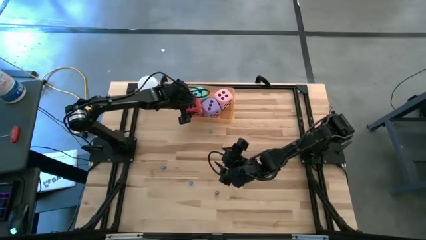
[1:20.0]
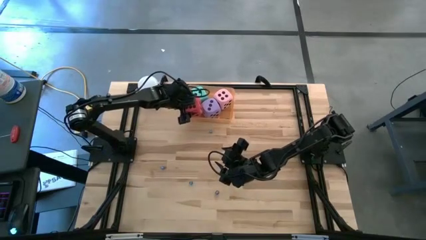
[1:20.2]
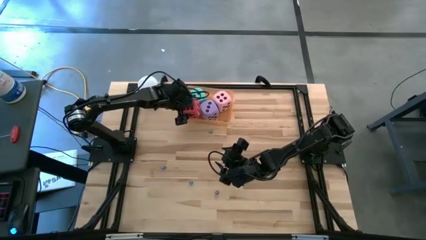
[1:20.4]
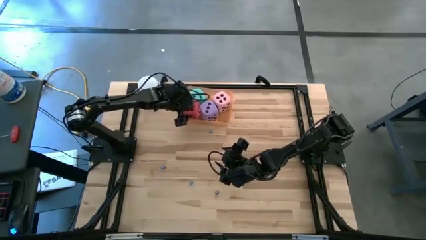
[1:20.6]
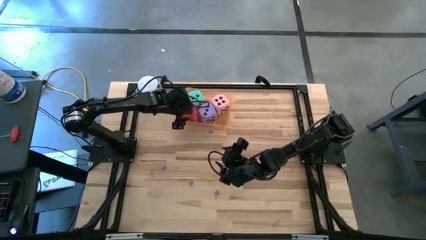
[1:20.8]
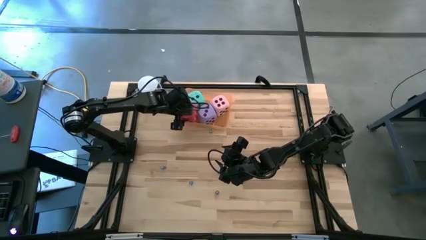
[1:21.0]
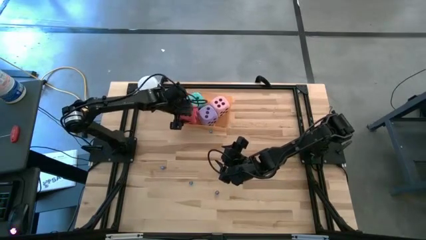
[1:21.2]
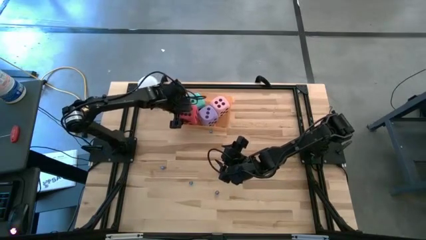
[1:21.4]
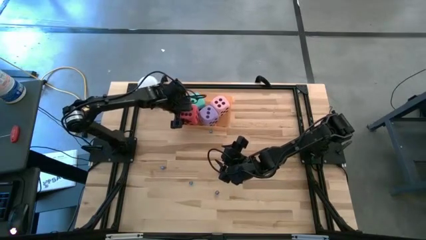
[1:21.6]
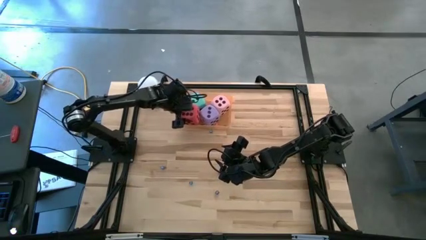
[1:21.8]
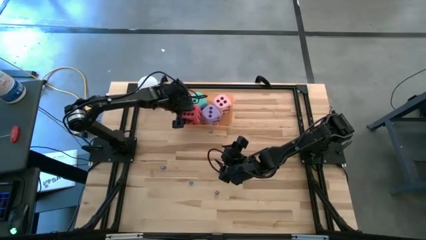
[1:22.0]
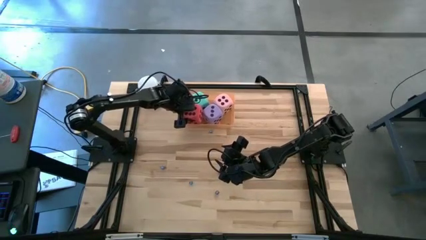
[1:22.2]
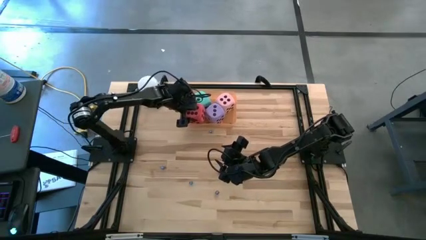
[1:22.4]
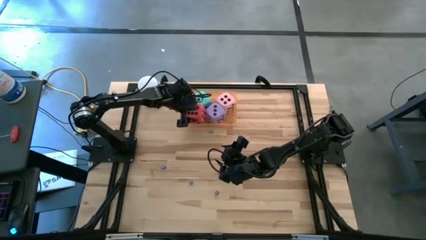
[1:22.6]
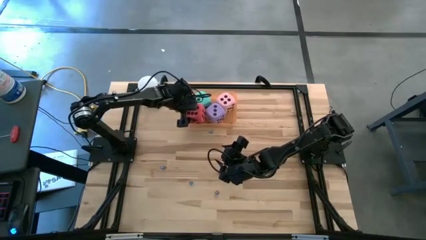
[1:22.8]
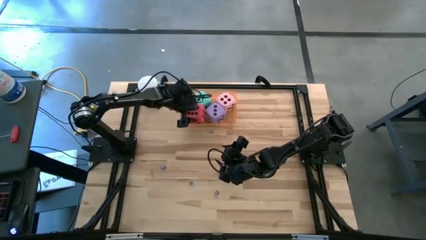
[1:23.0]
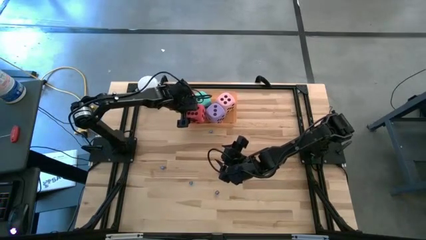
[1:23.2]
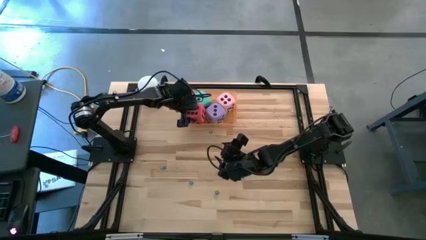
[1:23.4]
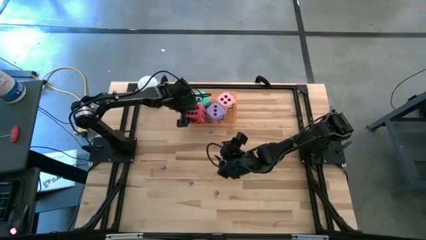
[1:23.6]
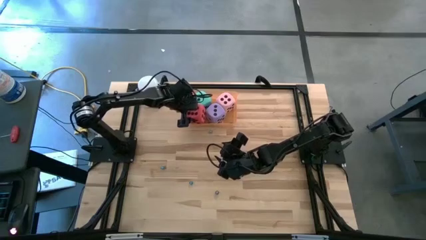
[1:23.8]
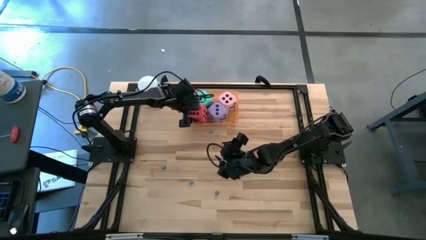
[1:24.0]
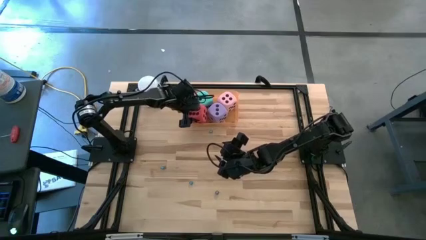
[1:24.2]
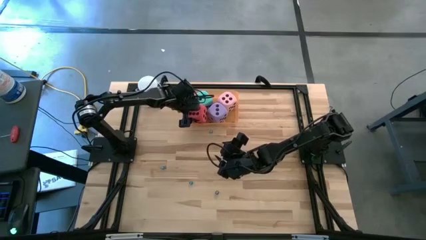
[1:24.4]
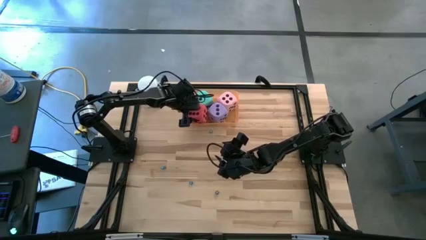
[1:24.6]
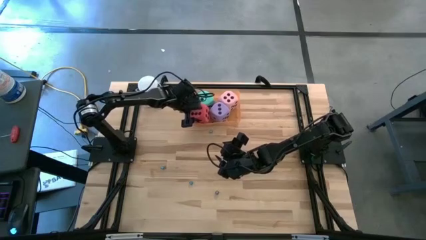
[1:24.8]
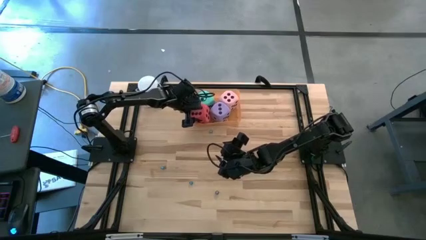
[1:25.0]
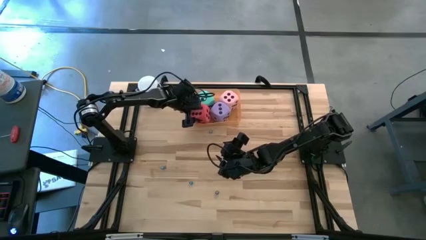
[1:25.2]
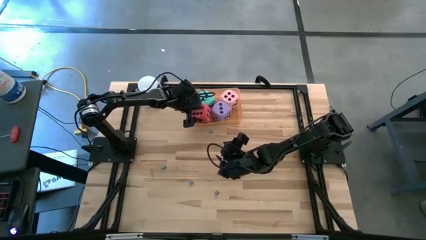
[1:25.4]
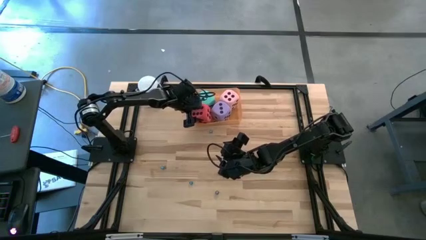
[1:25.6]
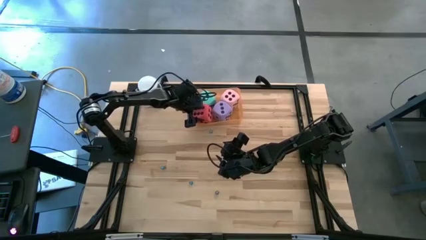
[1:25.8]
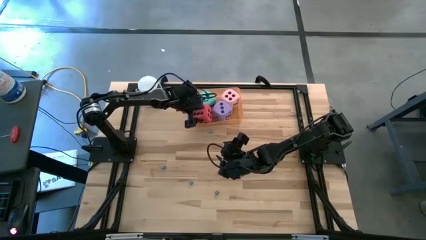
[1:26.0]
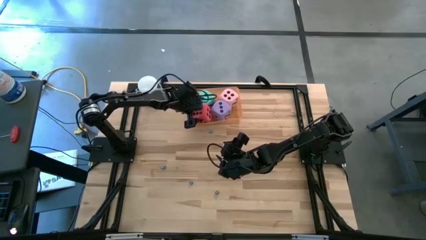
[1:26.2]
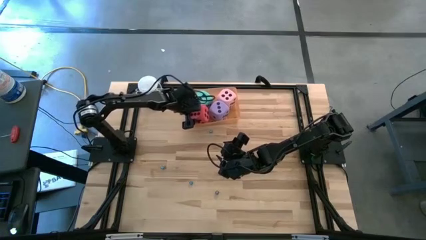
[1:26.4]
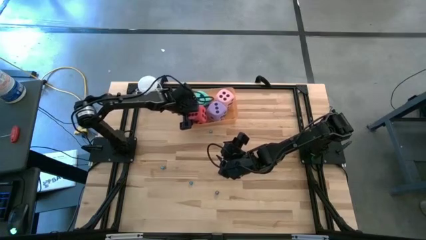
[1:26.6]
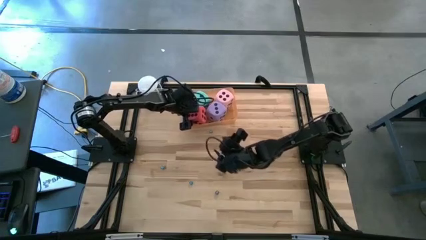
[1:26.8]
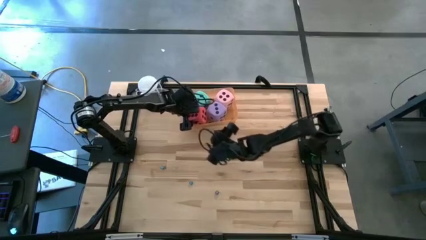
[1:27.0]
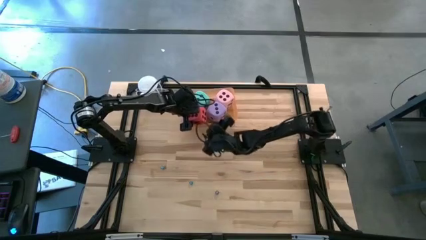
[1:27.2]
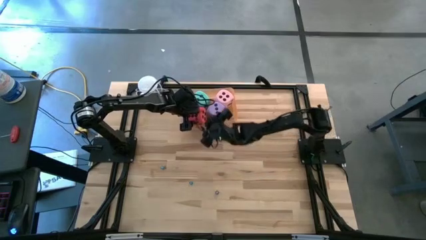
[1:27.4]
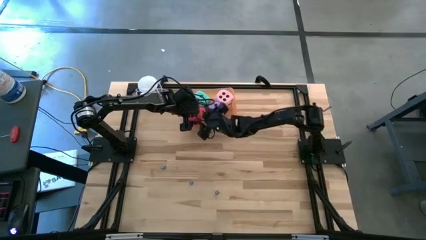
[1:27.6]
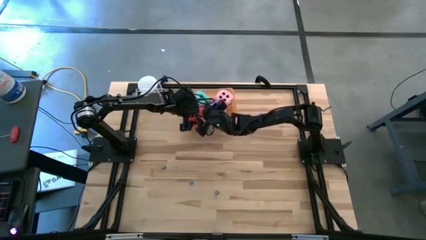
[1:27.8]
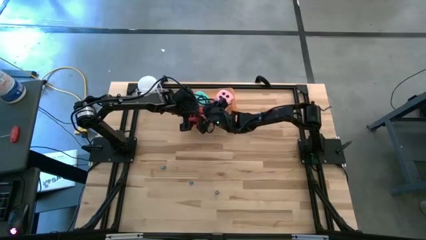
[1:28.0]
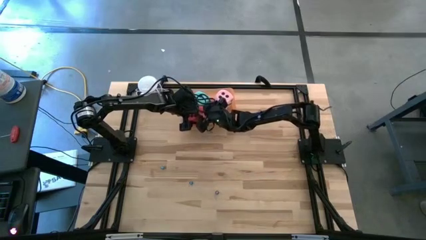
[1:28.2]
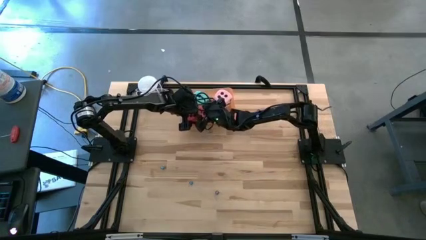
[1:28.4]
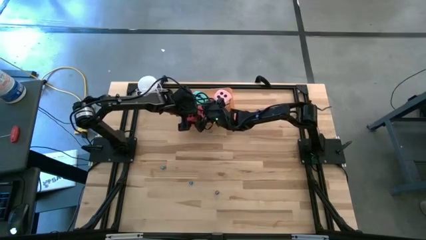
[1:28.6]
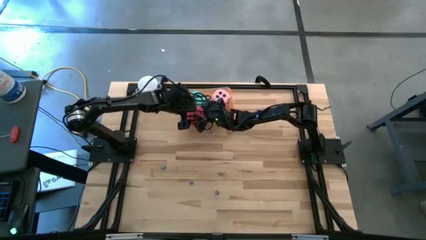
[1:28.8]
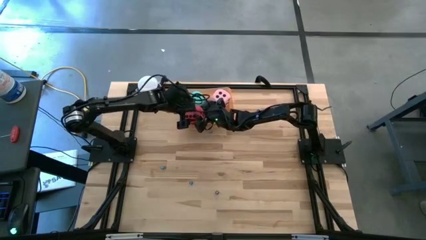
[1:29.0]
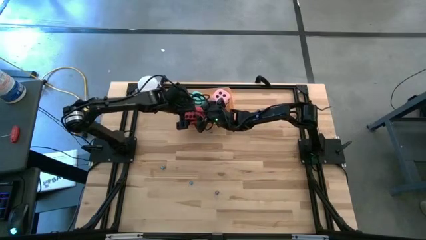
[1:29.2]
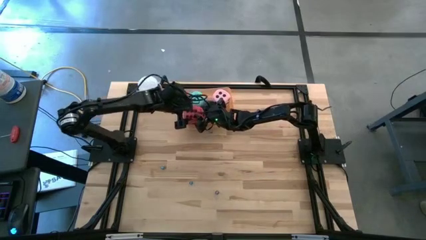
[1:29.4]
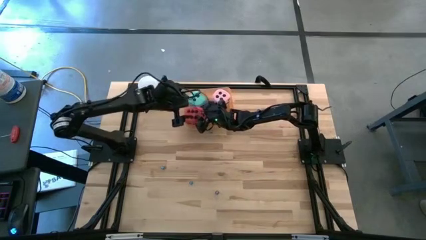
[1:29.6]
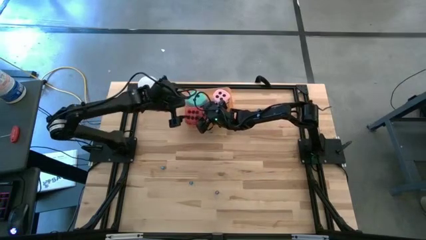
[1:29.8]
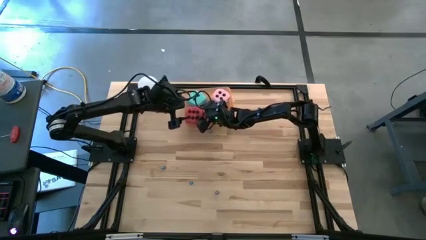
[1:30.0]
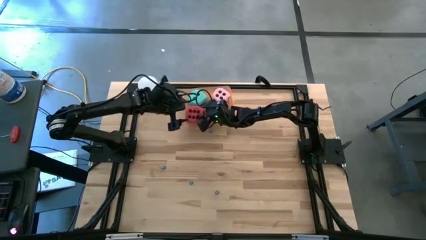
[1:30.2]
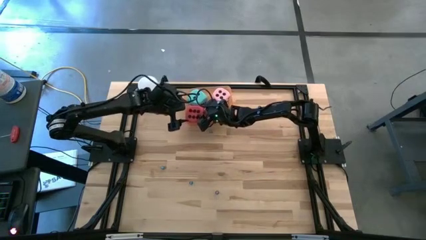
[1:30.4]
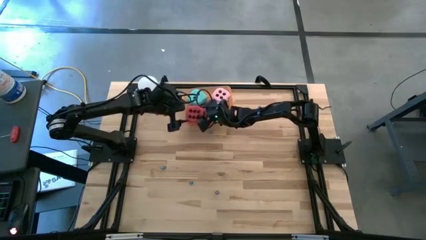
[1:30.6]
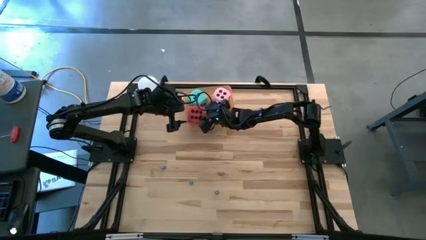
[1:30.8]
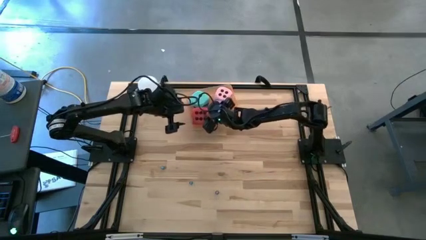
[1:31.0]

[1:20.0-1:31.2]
Task: Pick & Place Dice
Put the large red die into the bin

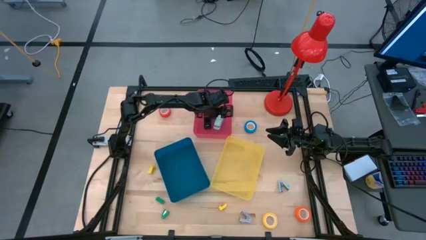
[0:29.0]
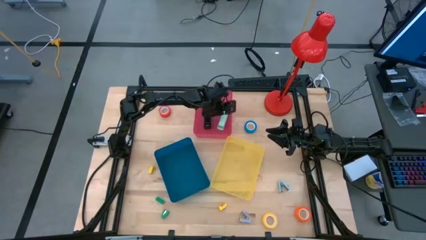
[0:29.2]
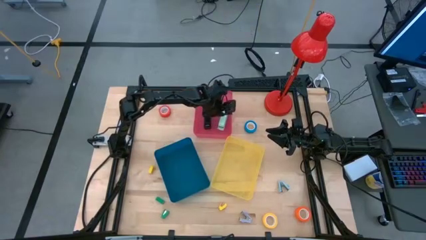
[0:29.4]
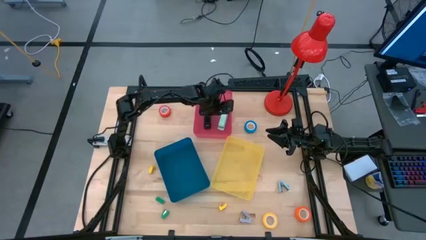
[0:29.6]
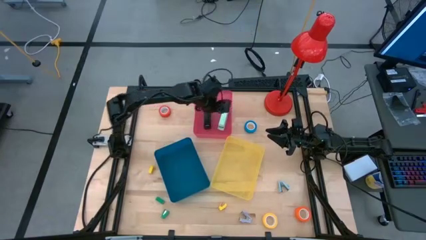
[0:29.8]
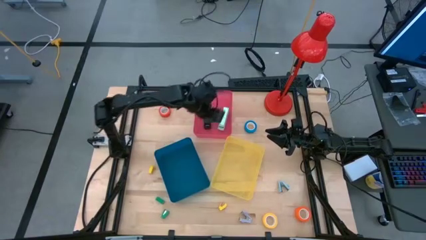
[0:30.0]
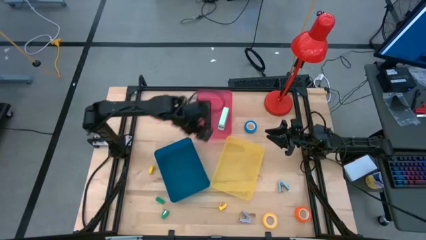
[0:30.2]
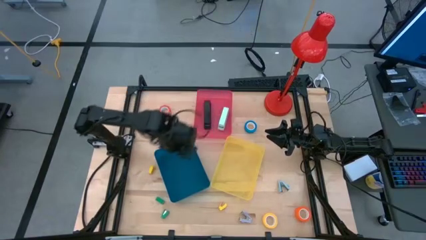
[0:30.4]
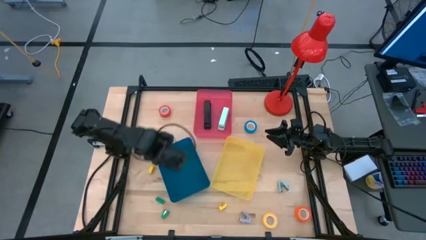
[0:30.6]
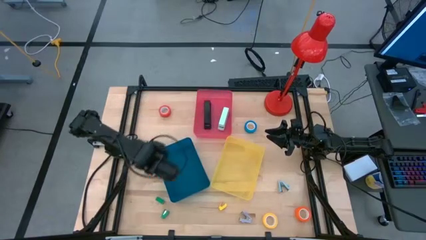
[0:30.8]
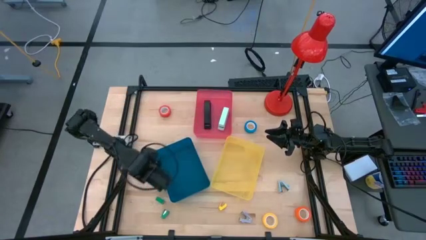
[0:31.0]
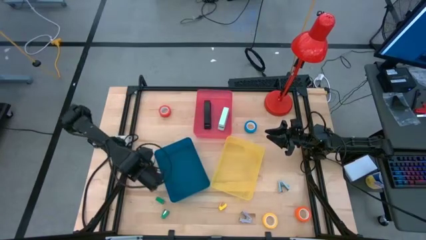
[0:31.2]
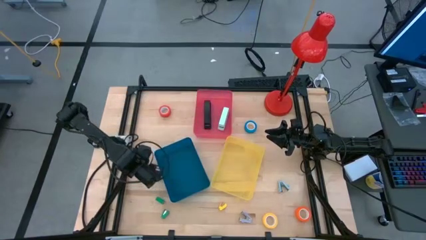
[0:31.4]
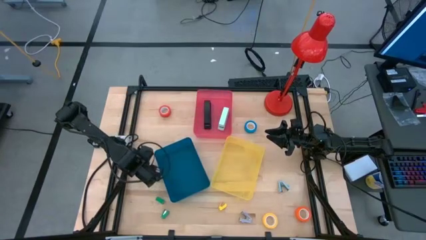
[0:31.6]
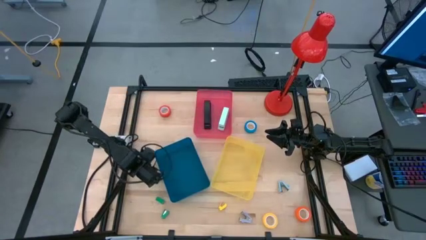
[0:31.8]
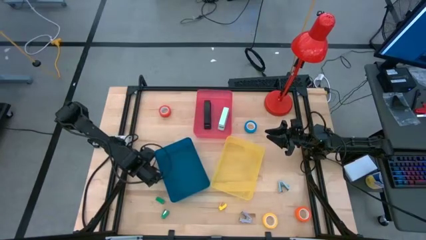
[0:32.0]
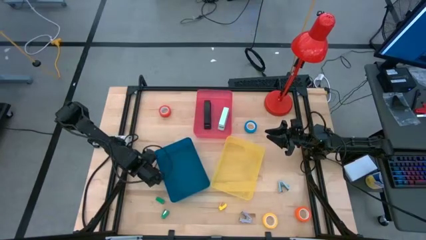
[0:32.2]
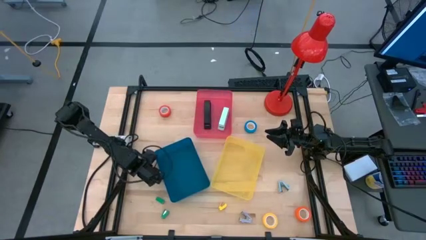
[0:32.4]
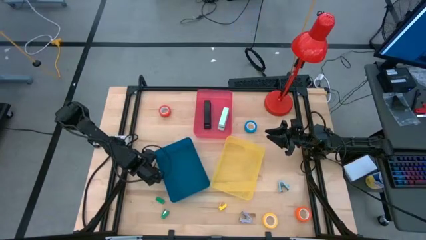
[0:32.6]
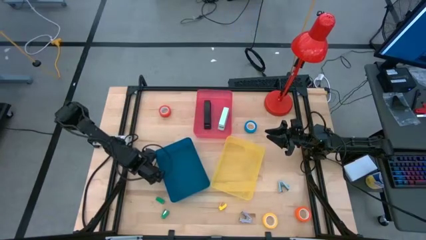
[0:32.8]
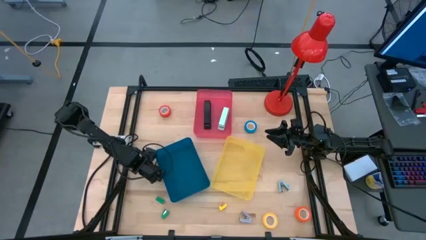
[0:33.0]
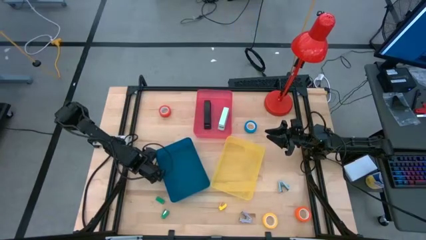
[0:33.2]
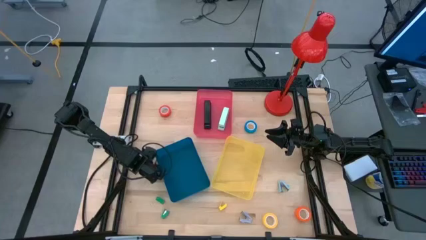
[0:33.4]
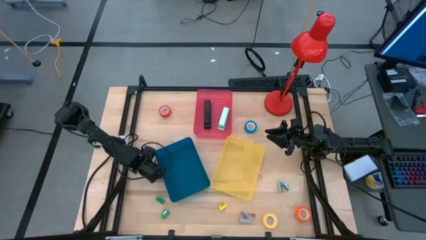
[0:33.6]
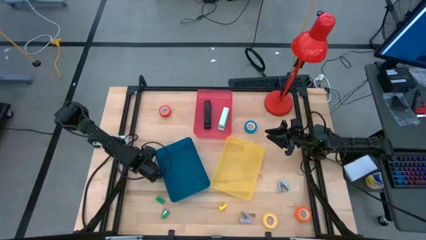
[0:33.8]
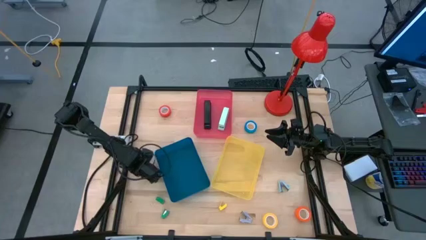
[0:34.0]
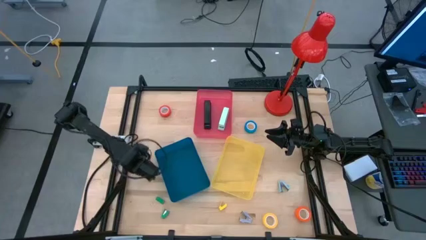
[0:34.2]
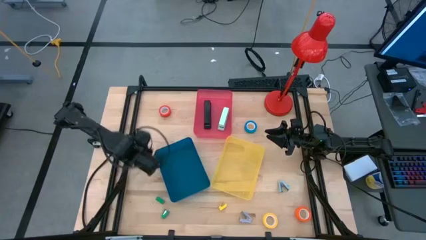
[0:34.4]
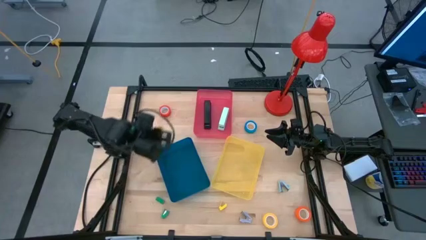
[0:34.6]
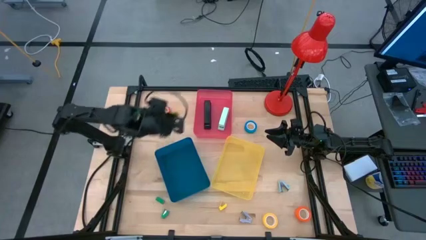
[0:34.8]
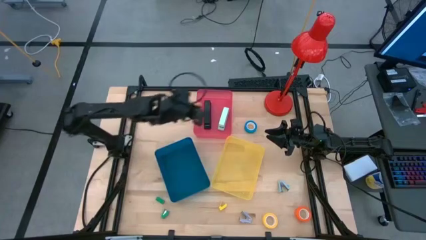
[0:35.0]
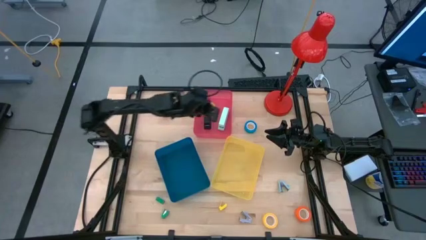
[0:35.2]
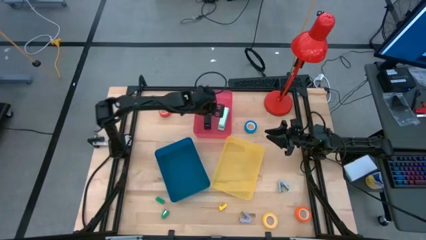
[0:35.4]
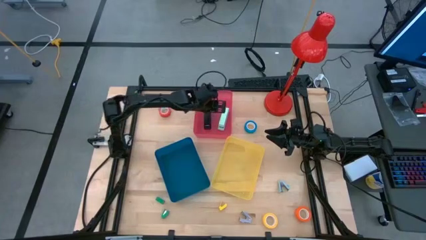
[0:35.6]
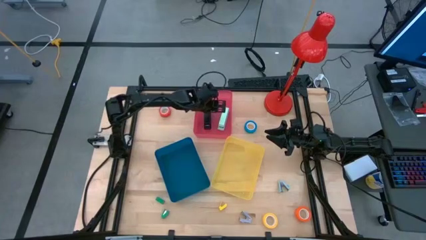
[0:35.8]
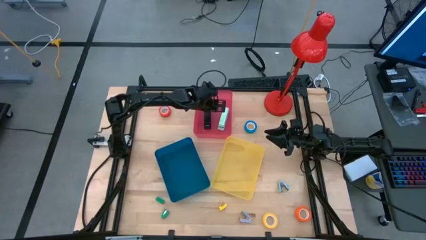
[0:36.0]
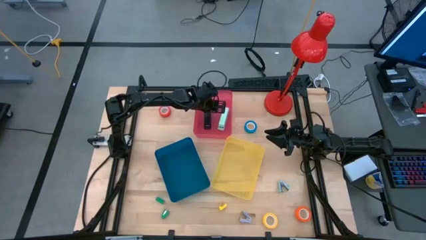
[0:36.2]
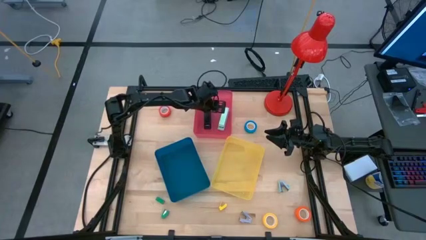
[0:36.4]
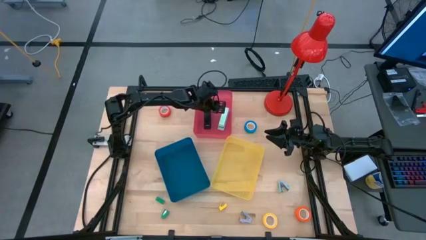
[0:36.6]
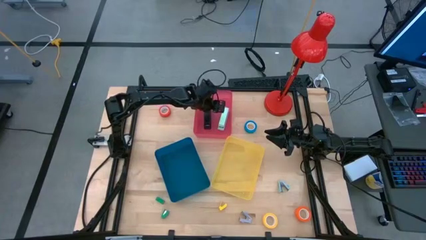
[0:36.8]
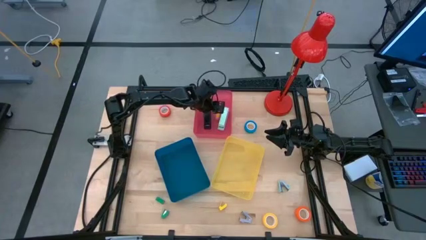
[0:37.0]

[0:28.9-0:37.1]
Task: Pick and place Stapler, Stapler remover, tape
Put the small yellow stapler into the red bin
